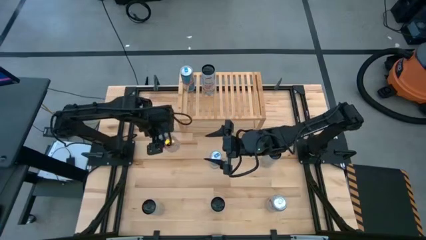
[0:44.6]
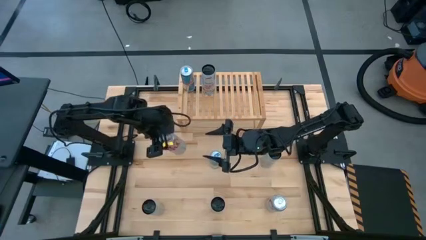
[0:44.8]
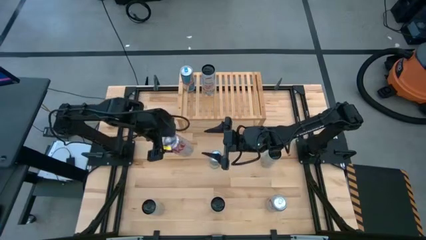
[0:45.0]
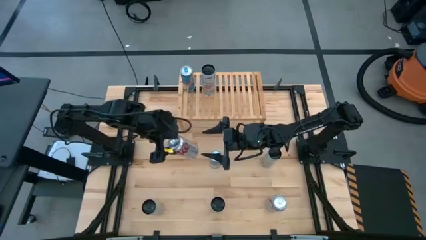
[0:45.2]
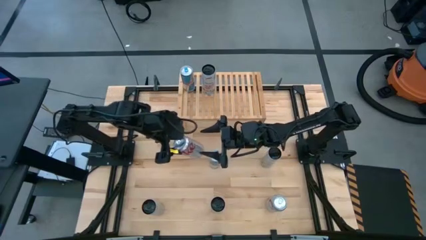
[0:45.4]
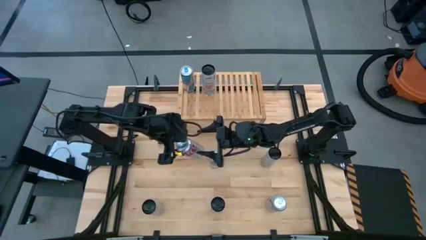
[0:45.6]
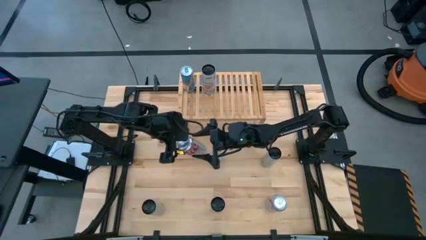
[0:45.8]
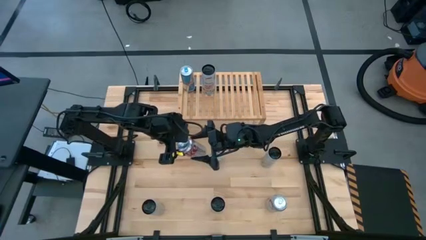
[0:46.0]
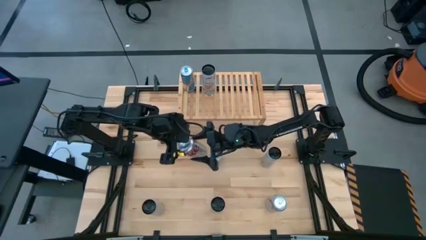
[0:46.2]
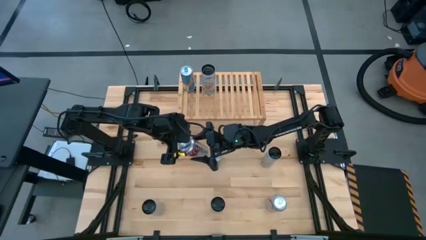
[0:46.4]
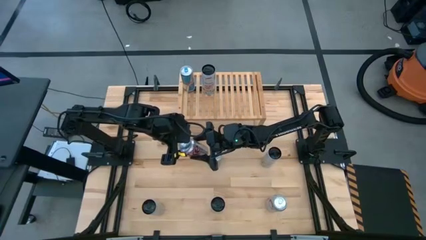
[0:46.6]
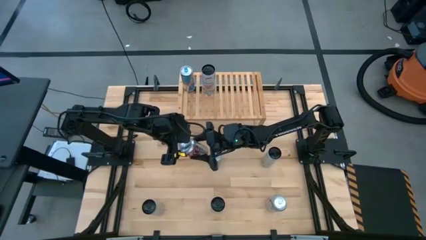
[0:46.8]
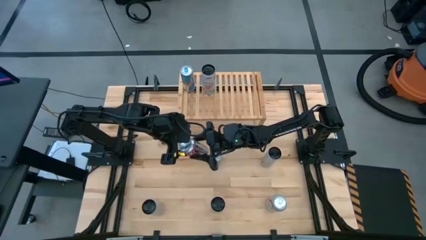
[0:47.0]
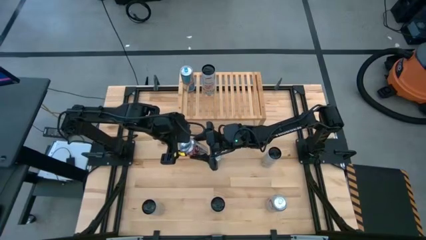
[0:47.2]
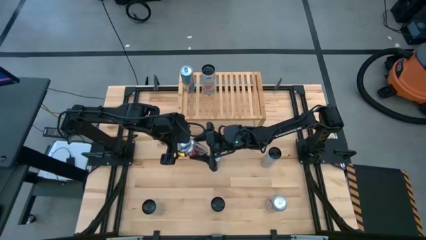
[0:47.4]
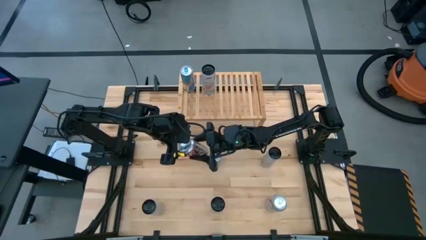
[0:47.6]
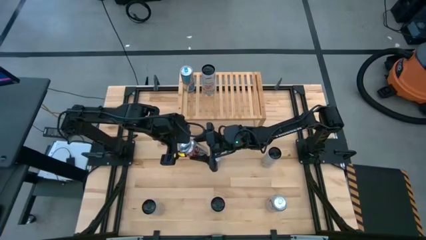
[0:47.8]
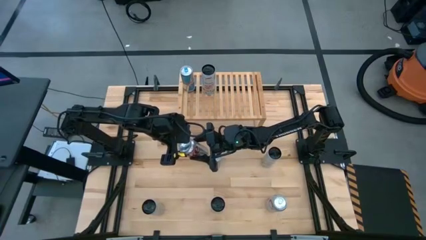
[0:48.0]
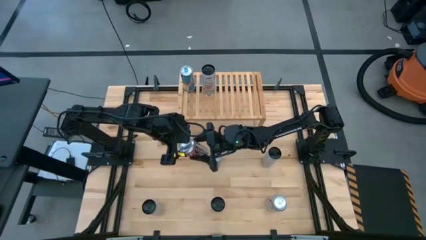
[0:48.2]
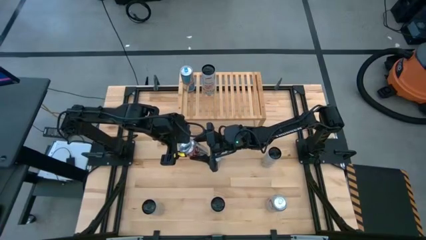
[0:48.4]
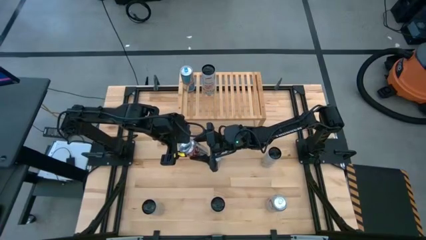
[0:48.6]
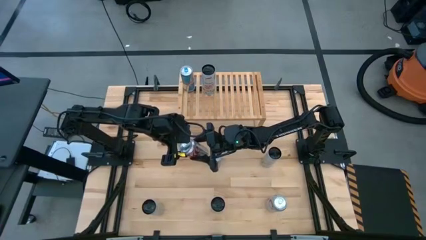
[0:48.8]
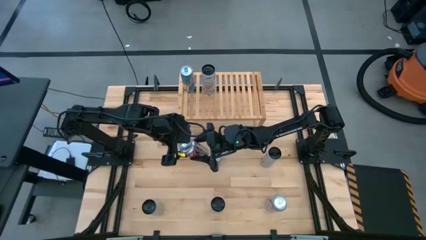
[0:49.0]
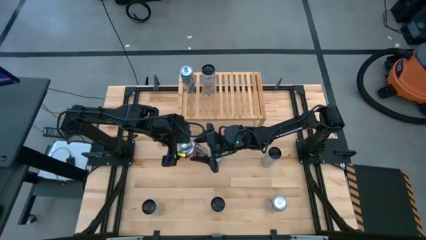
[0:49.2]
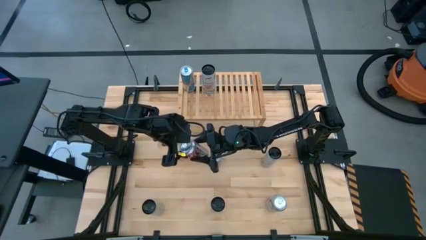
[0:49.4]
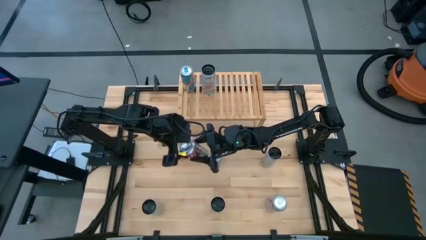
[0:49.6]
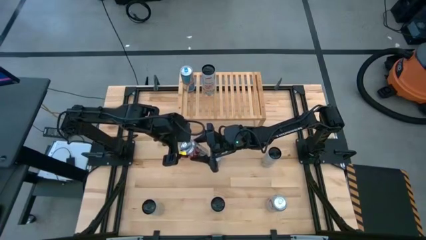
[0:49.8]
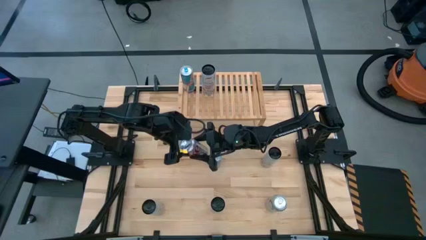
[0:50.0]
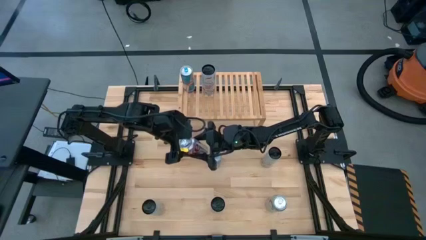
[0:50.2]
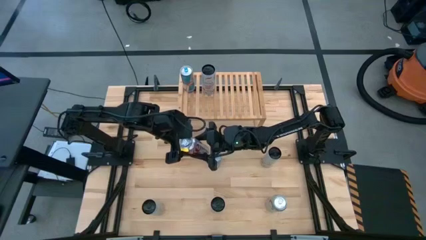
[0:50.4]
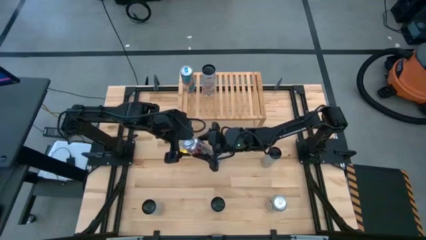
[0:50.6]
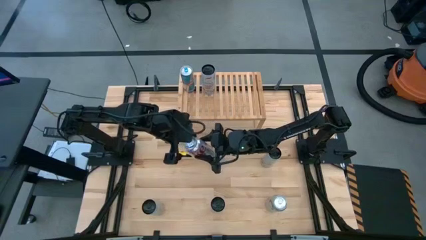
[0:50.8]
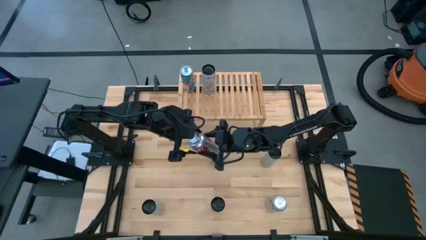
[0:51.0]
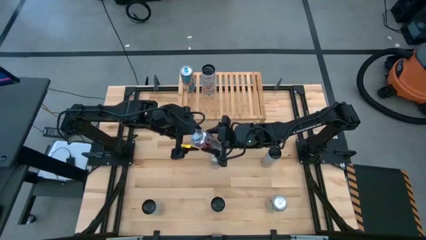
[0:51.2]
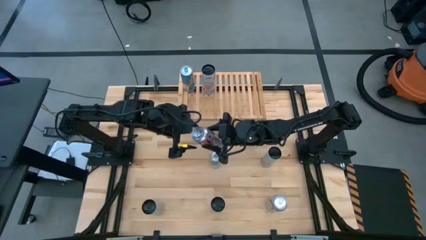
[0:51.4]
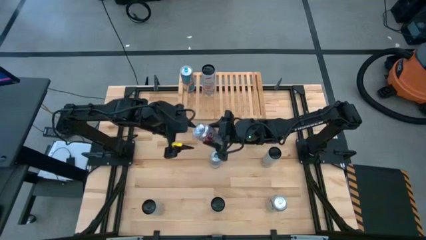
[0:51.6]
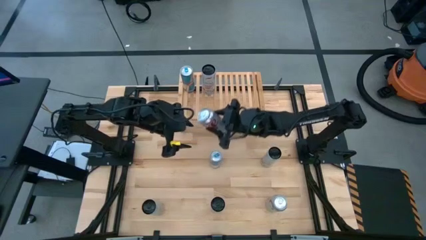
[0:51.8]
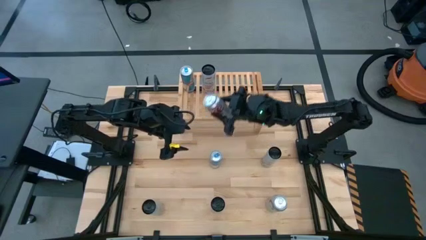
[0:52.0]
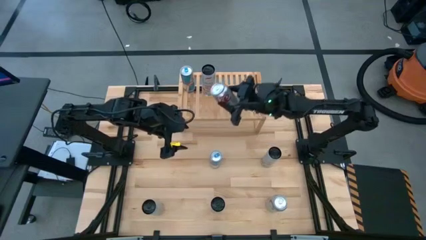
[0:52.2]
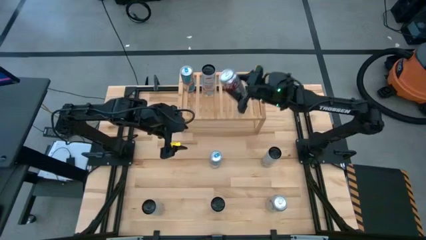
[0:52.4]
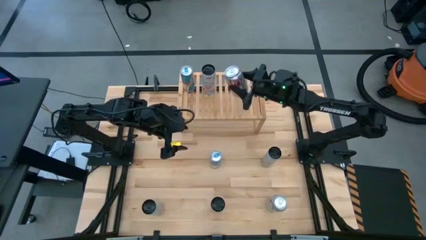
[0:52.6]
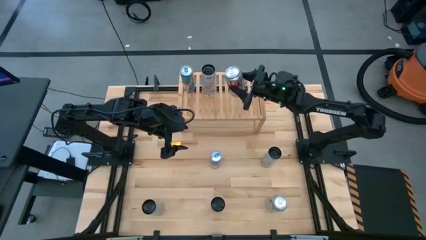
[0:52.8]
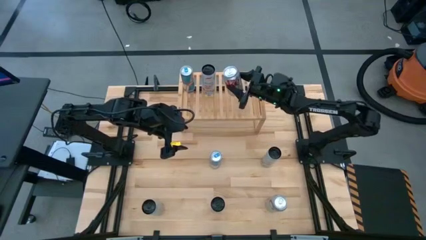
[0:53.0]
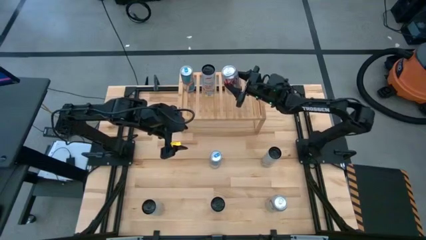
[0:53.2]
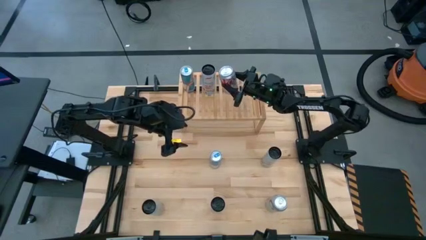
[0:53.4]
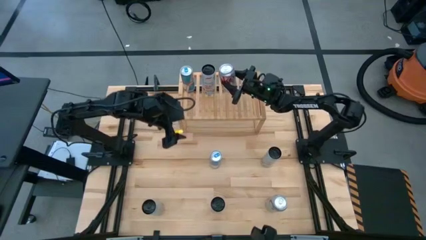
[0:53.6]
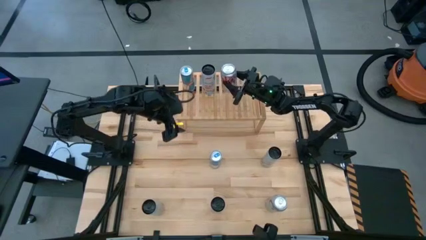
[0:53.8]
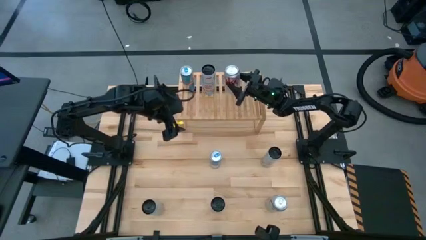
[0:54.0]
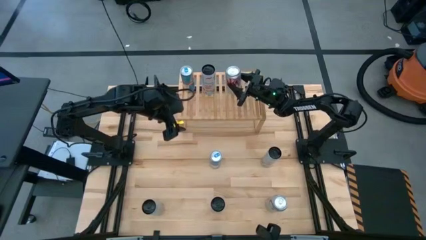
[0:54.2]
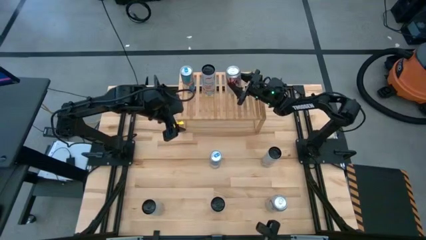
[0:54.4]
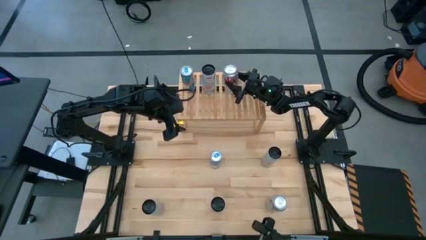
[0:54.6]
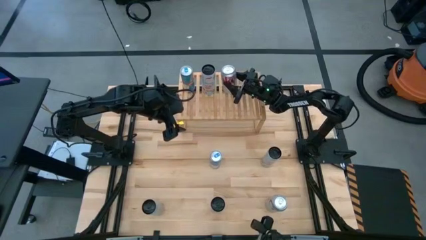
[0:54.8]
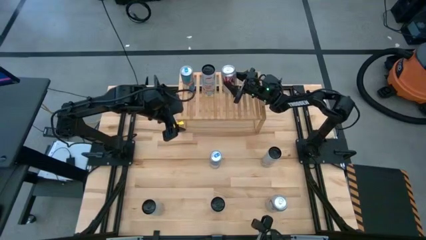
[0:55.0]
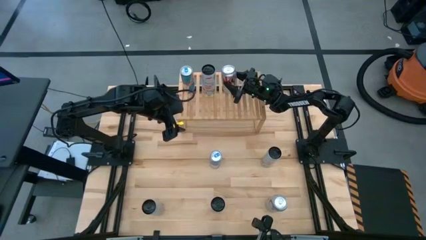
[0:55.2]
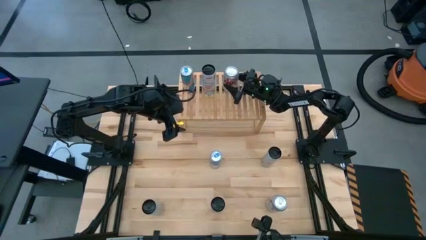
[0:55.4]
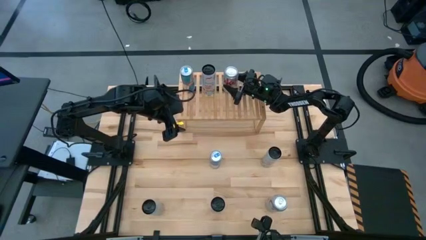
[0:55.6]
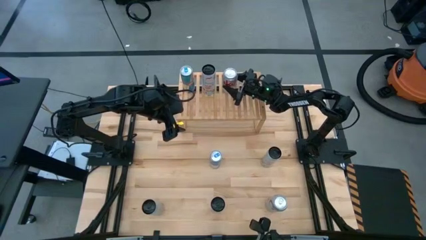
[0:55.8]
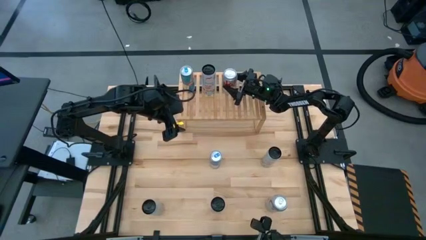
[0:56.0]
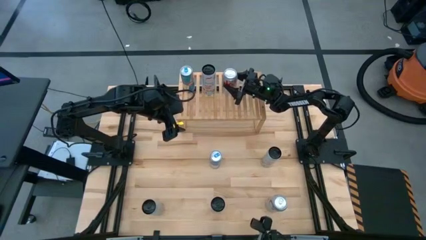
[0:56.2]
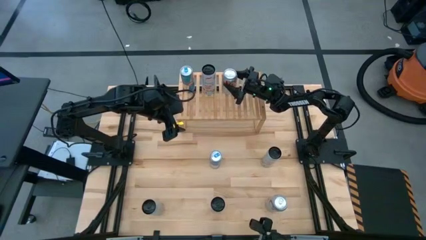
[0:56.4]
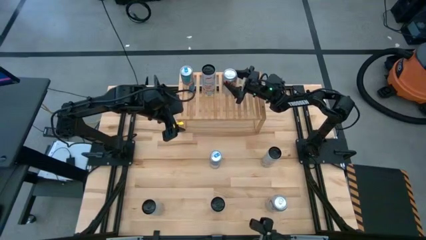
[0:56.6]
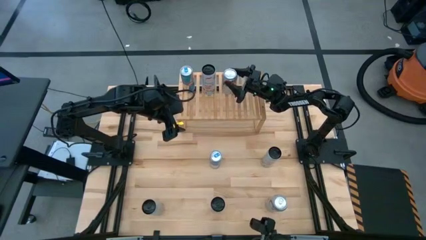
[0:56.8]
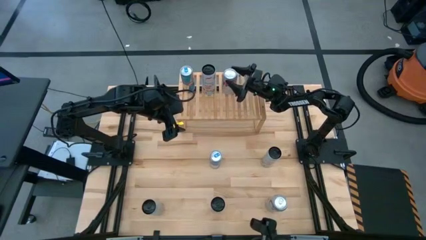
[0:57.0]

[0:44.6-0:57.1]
Task: Place canned beverage on shelf
Put the top silver soda can on the shelf

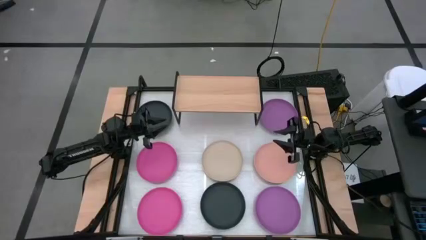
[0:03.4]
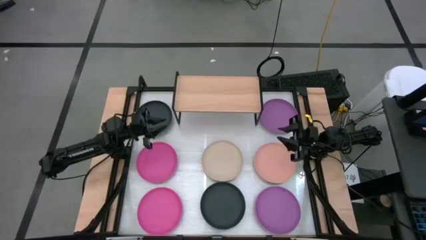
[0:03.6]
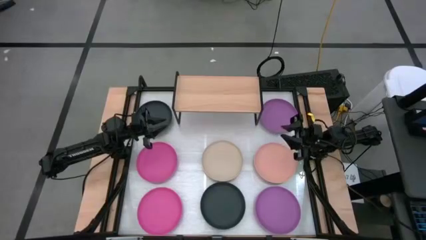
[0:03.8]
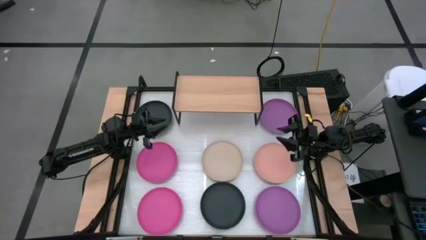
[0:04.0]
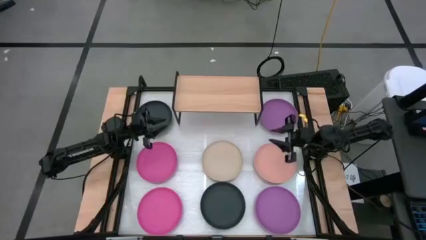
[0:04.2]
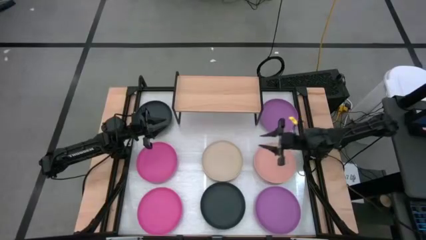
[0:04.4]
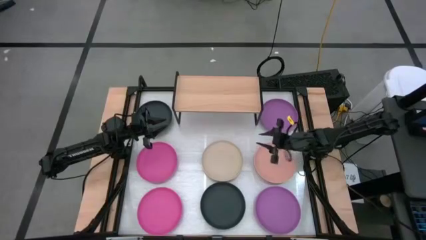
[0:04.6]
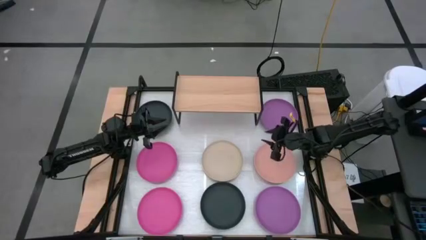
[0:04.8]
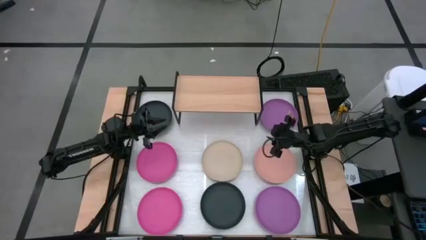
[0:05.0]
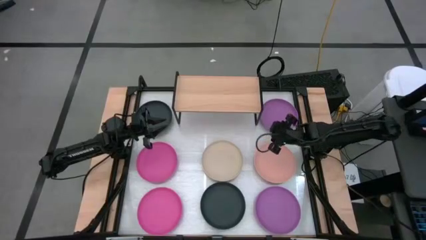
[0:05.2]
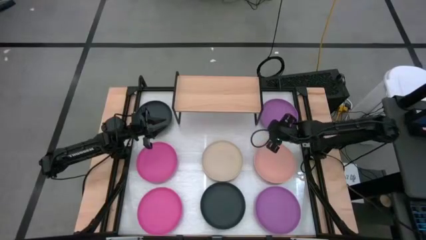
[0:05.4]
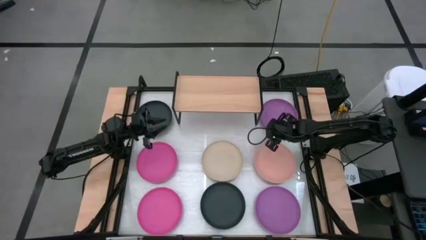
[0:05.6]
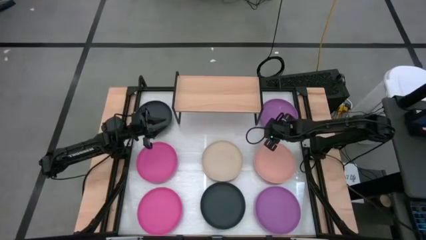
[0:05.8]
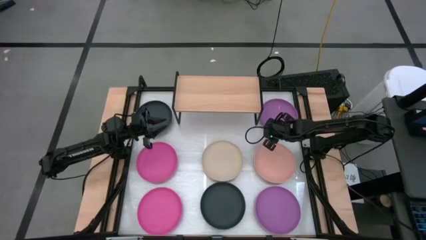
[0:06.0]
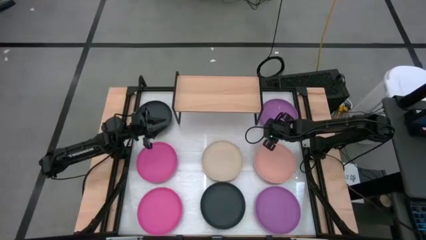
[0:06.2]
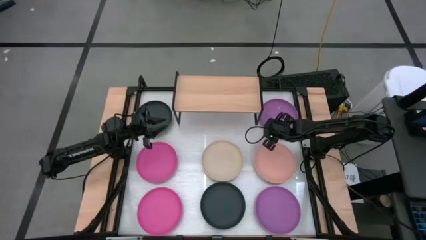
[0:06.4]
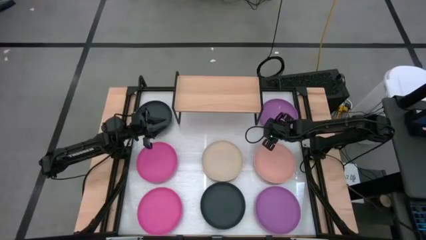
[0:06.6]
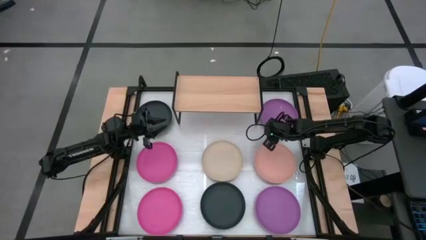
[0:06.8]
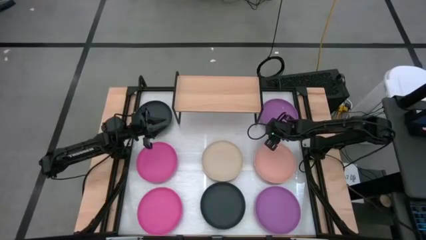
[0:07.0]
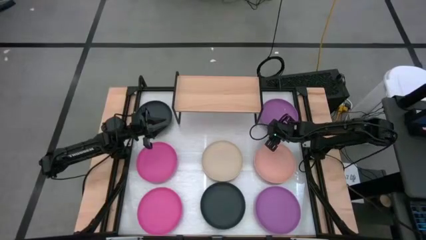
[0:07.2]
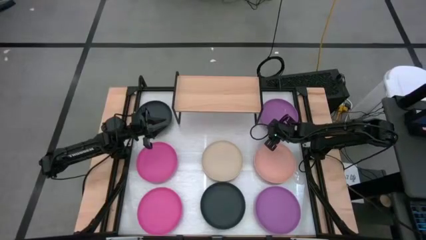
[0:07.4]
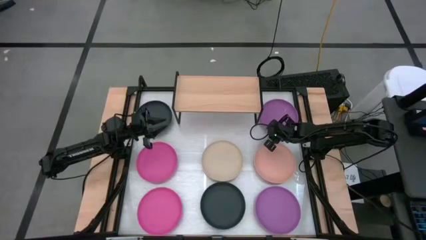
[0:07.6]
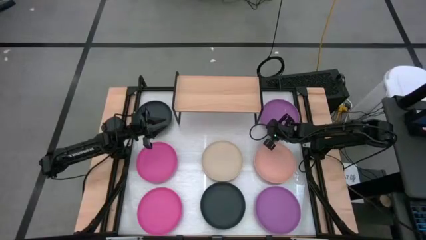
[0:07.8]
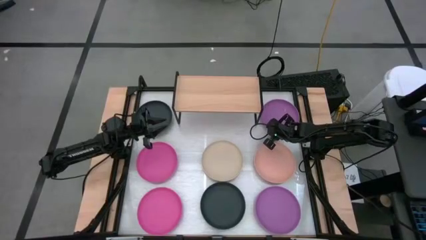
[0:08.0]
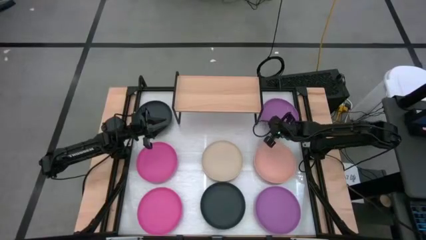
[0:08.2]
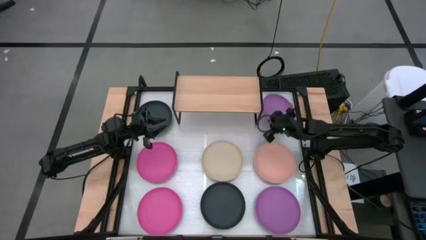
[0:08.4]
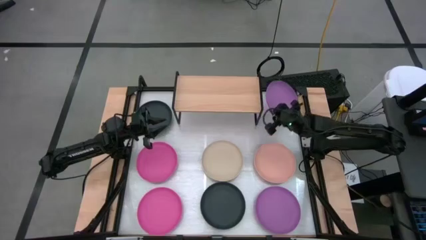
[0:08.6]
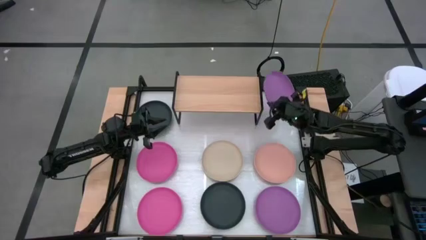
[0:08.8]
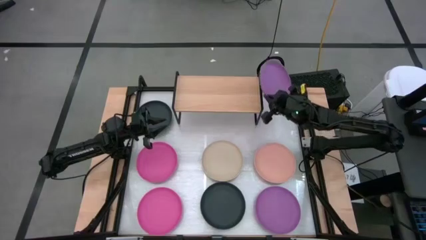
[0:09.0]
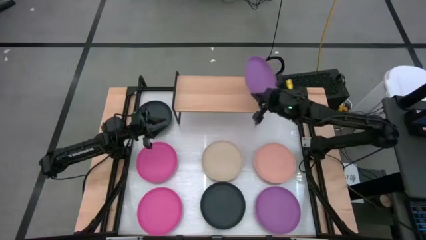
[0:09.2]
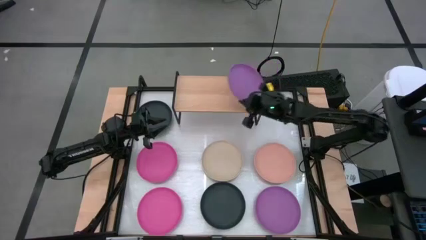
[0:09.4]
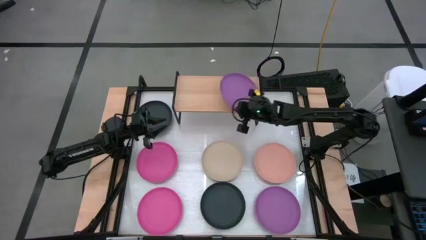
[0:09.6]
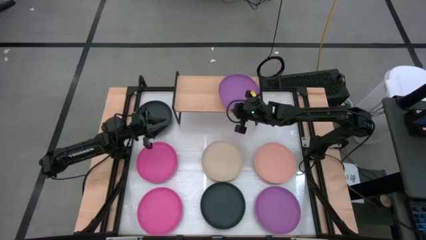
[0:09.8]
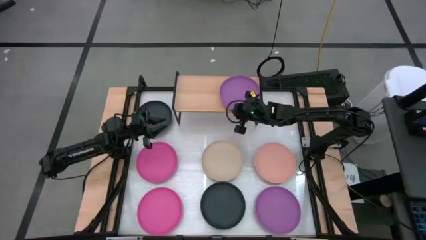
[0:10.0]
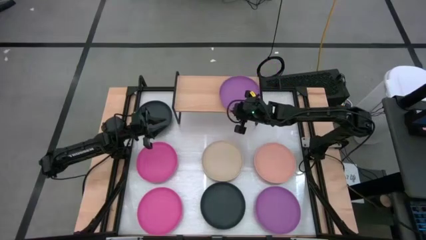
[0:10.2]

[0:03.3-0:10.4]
Task: Place and stack plates onto a shelf
Put the top violet plate on the shelf
